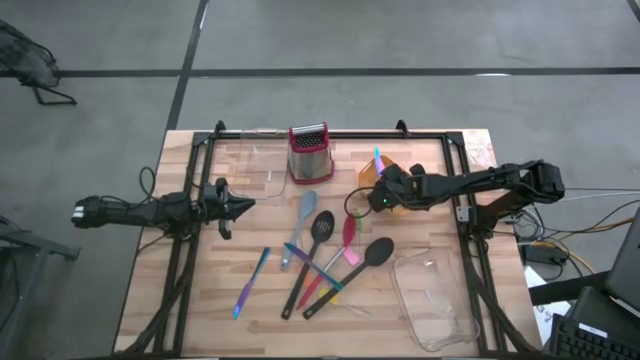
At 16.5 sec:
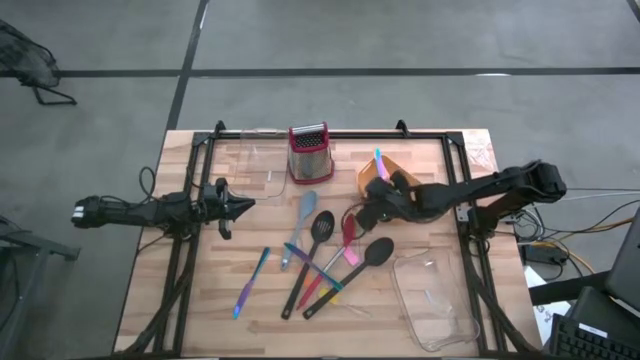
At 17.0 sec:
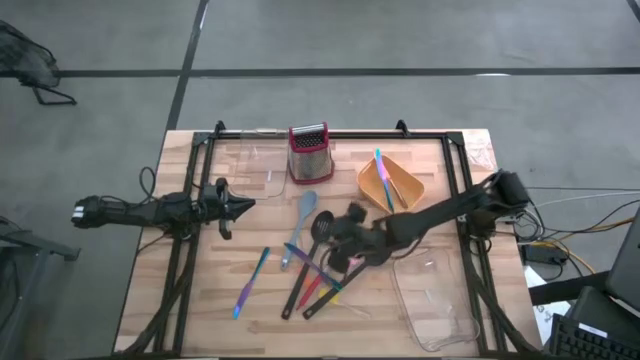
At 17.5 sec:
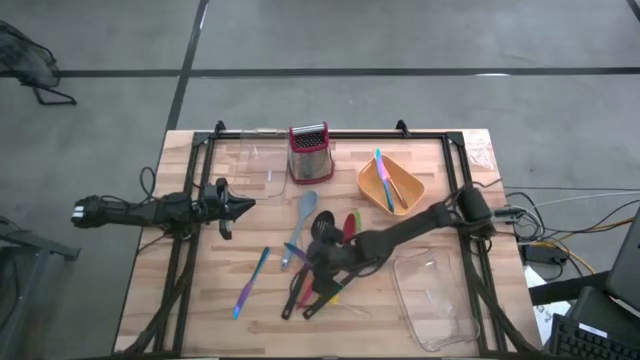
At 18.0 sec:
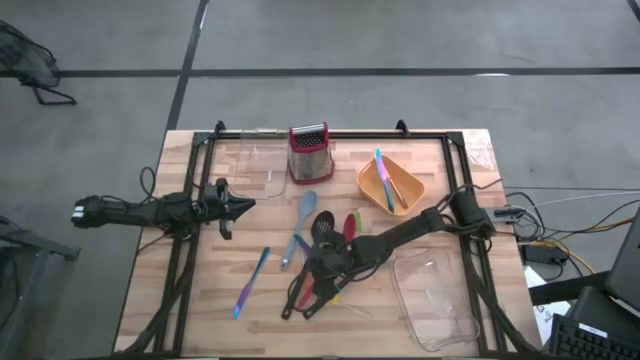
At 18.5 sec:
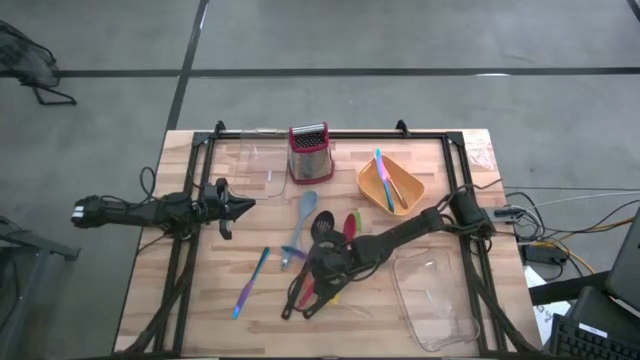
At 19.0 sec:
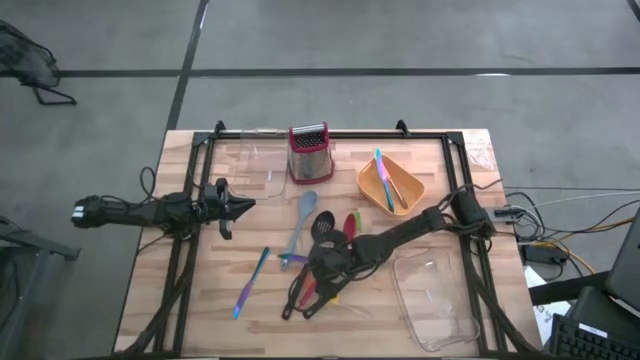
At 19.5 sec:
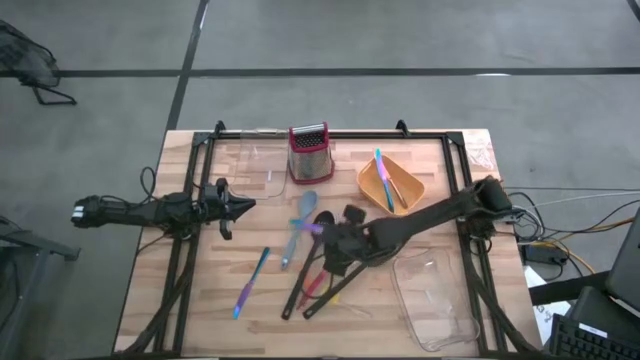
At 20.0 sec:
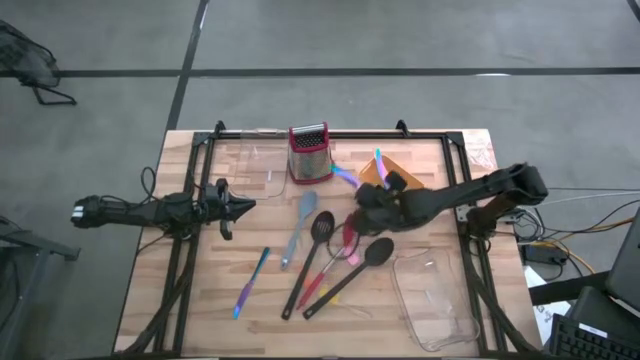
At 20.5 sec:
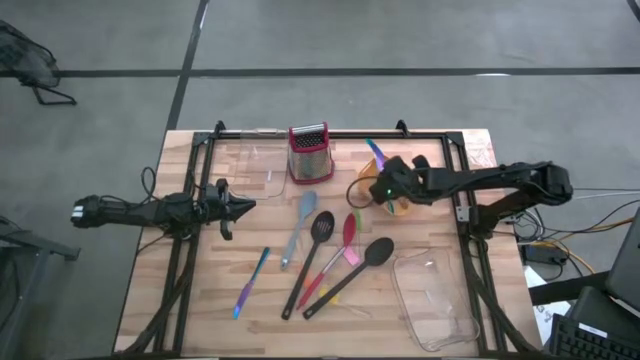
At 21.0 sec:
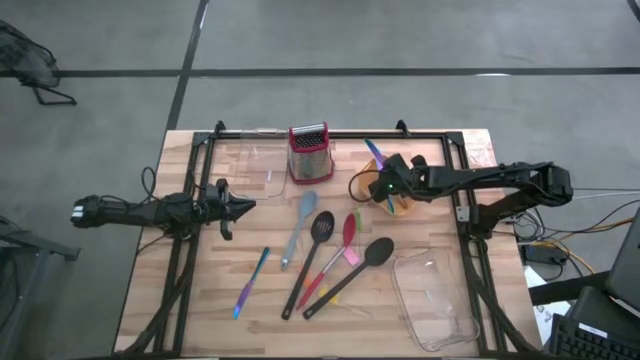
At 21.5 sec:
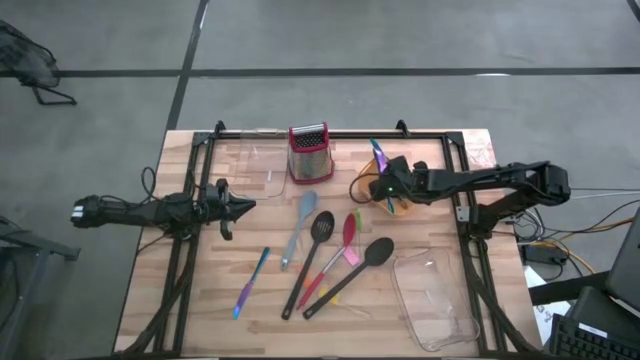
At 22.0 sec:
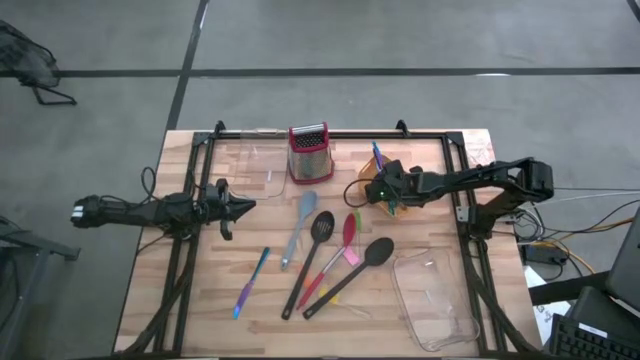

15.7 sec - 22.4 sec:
Task: Pick & Place Kitchen Items
Put the right blue table knife into the orange bin

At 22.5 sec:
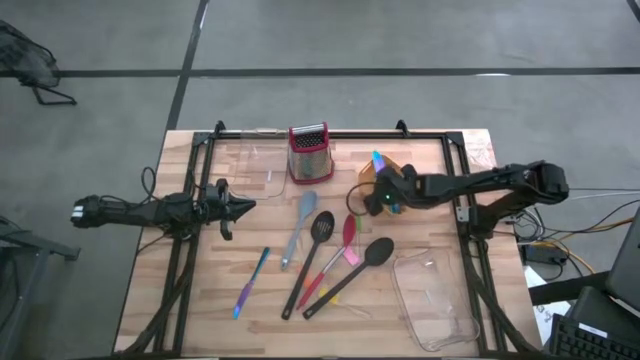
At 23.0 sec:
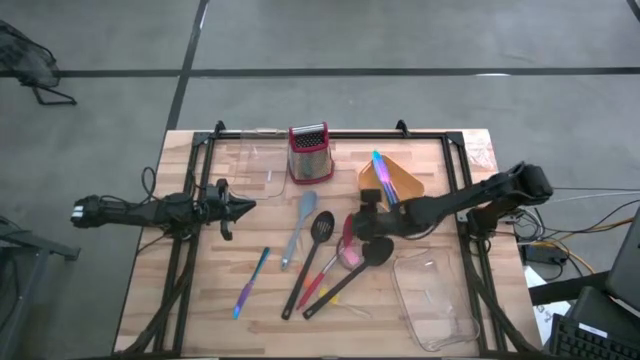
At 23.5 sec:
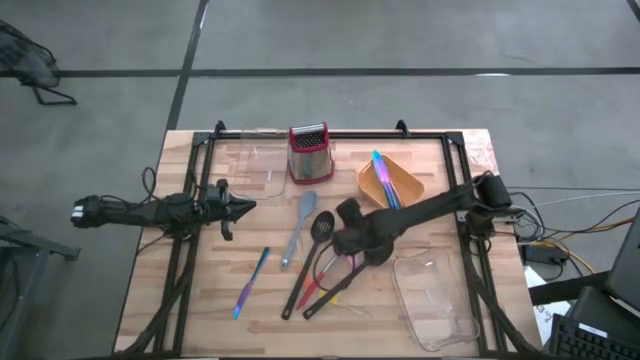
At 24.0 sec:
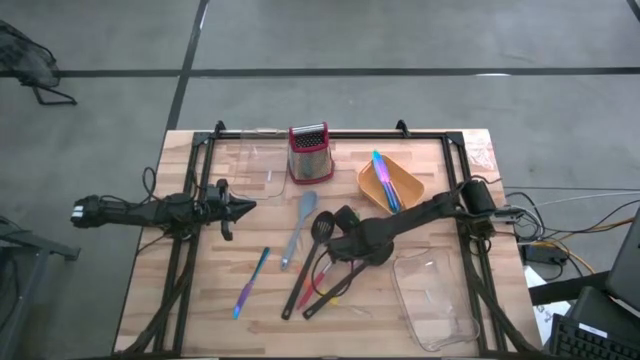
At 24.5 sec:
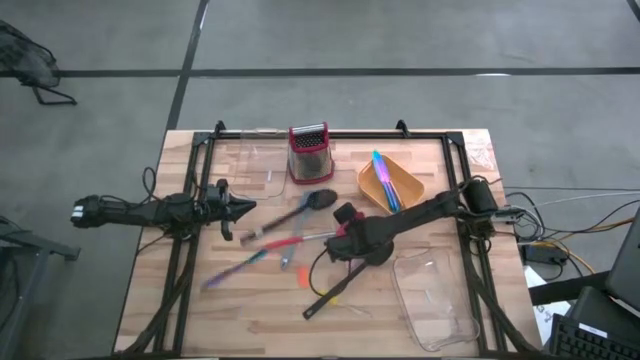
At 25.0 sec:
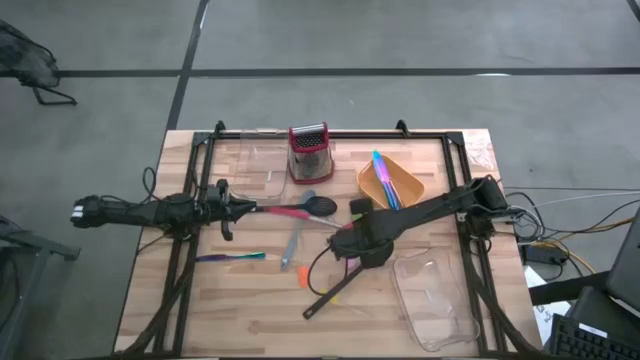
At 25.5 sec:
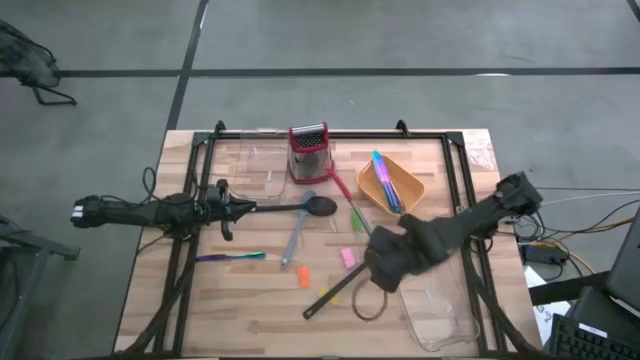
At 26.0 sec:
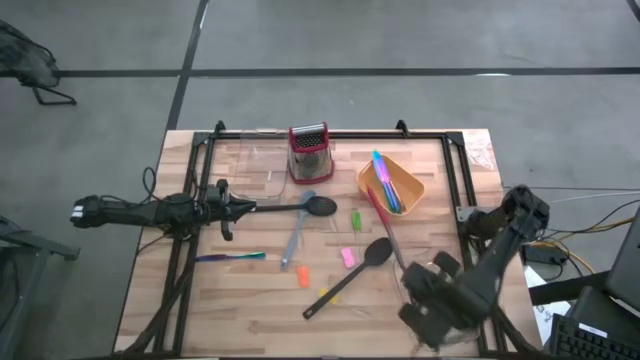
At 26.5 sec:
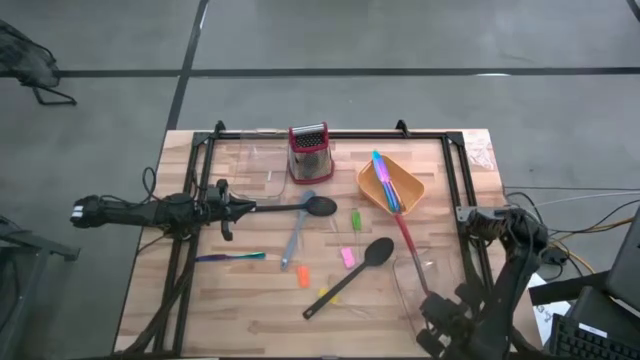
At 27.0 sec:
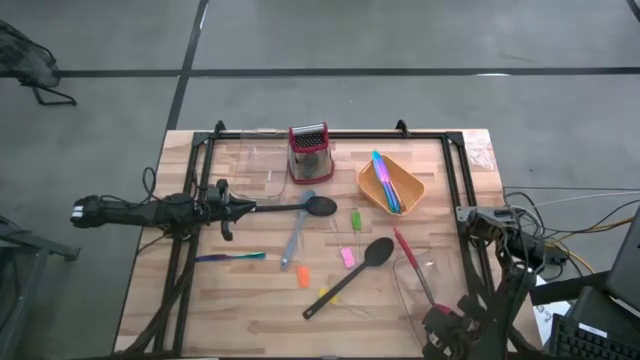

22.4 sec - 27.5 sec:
Put the red serving spoon into the bottom transparent bin

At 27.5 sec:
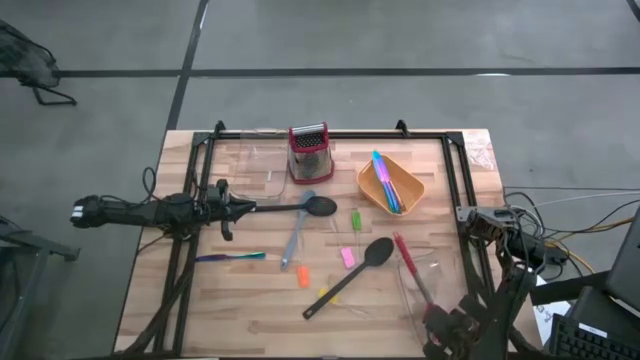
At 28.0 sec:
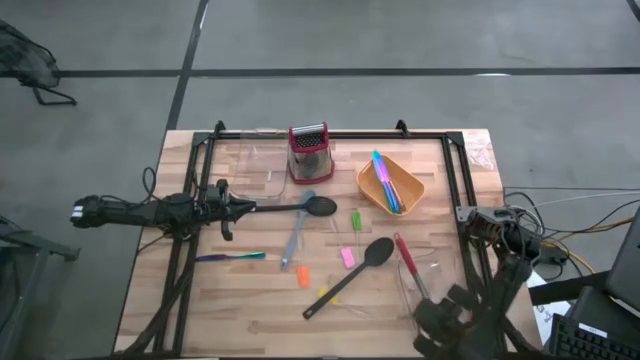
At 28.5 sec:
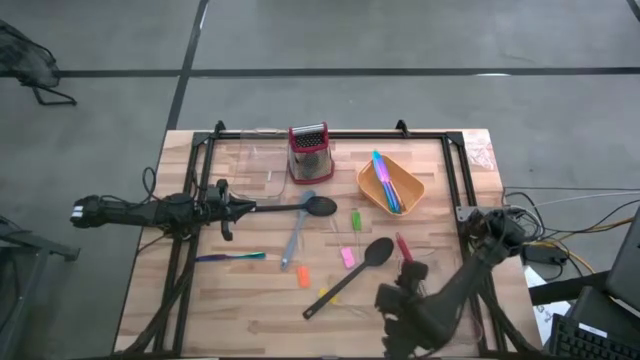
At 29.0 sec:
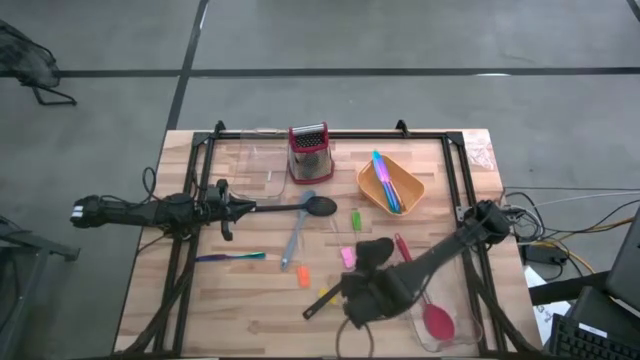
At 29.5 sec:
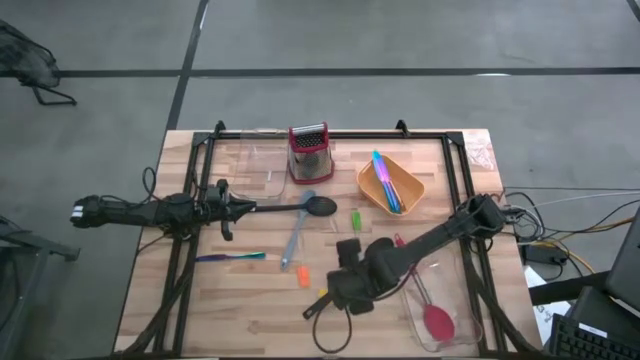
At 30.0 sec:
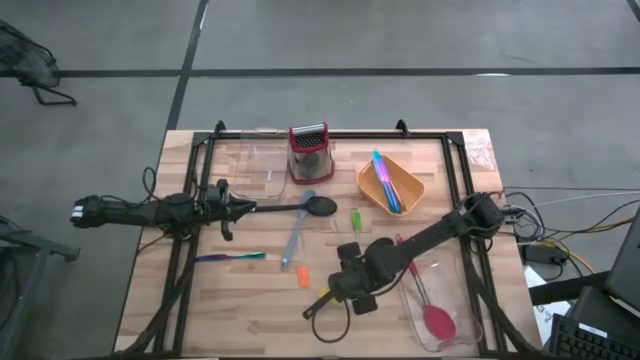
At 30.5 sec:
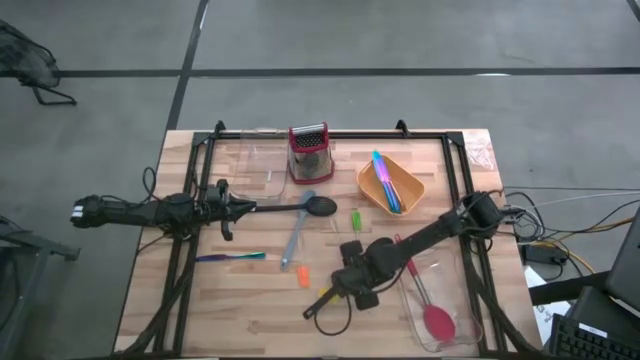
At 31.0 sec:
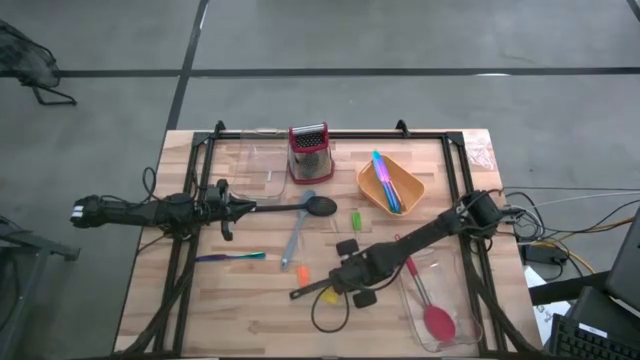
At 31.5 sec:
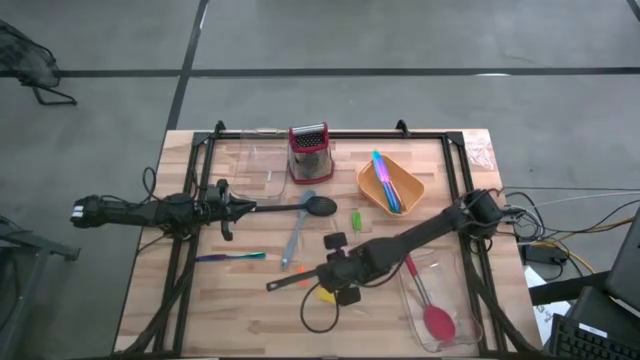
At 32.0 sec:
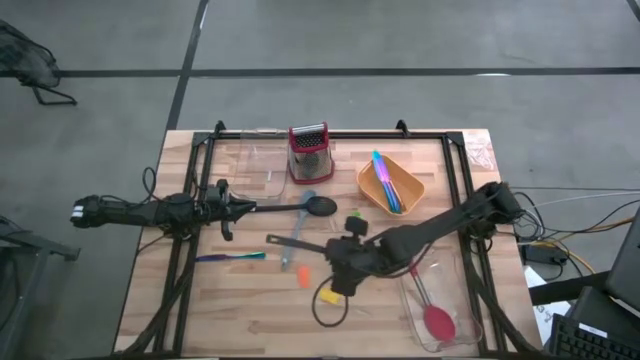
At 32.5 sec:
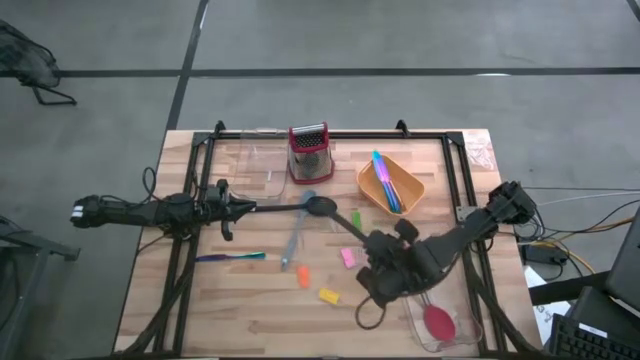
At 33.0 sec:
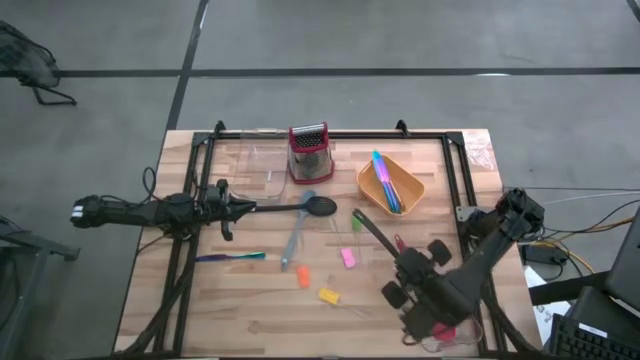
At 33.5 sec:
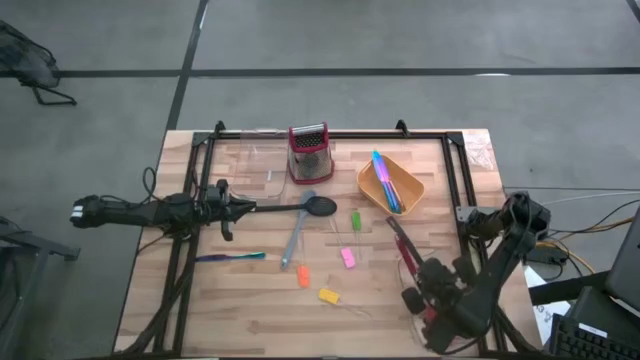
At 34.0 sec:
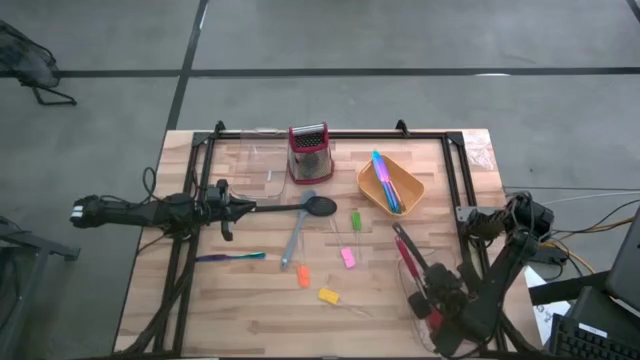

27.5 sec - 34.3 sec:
Put the black serving spoon into the bottom transparent bin

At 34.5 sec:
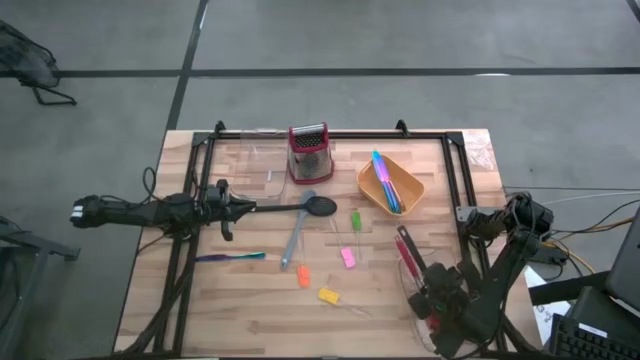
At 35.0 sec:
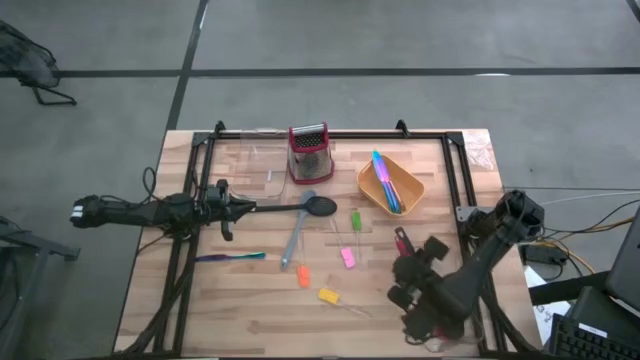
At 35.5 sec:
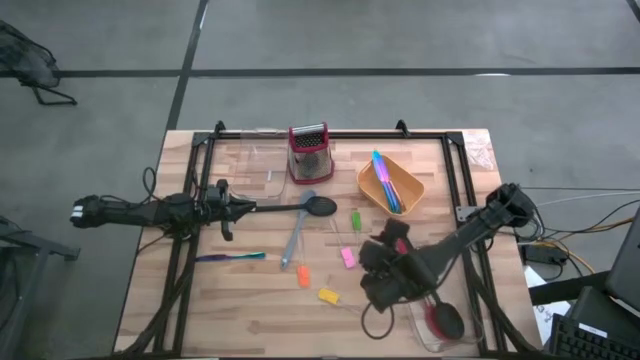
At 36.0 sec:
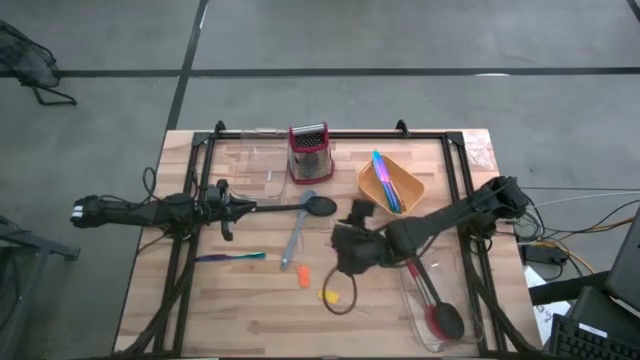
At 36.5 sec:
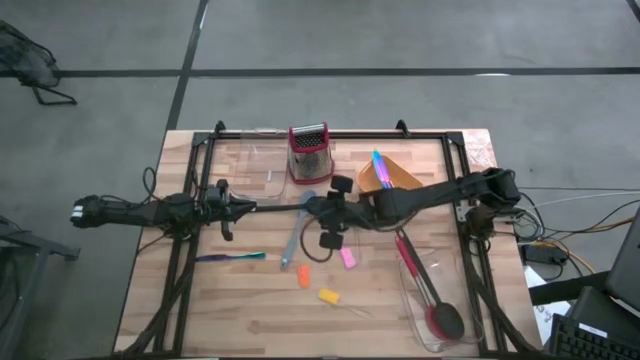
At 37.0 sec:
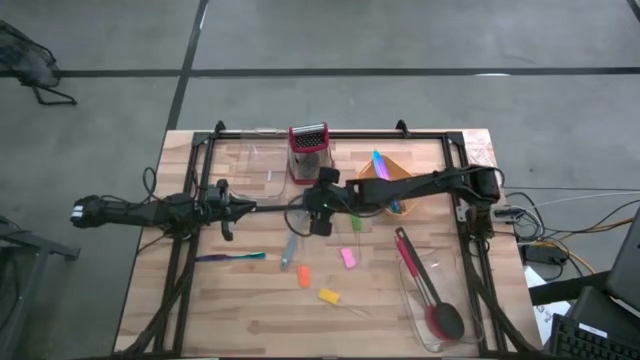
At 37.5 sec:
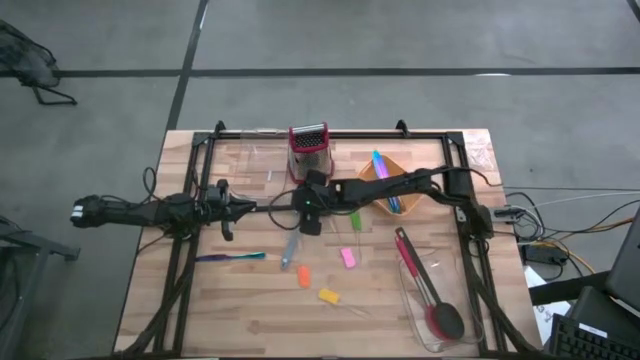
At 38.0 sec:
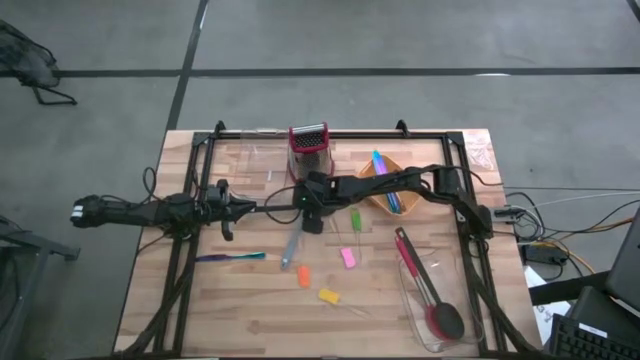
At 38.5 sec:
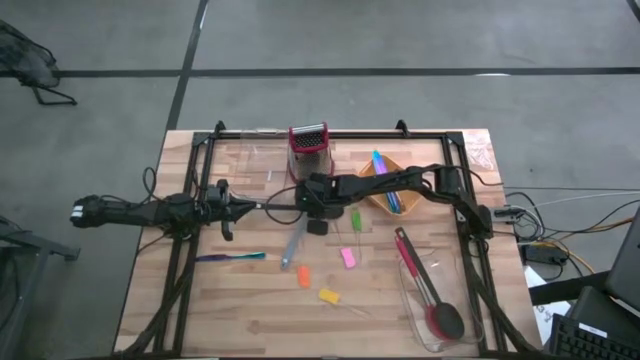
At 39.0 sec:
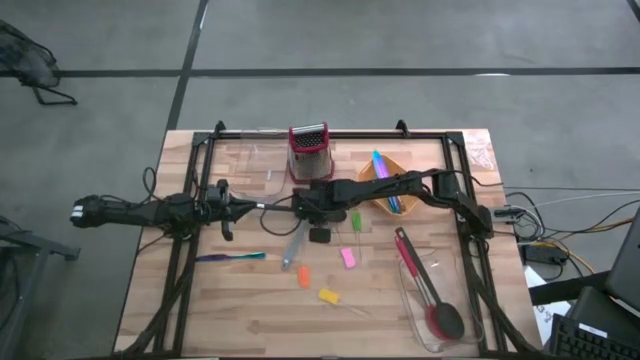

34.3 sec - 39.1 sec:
Put the black serving spoon into the bottom transparent bin
